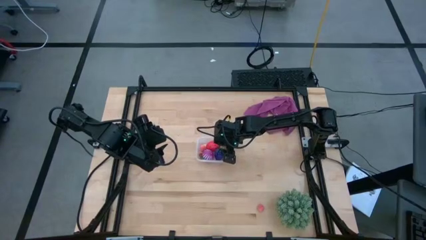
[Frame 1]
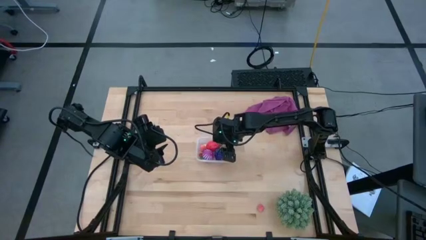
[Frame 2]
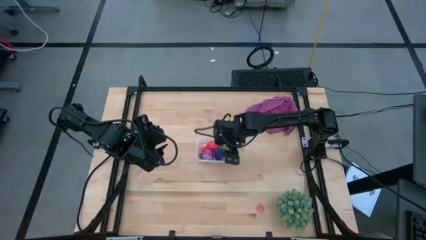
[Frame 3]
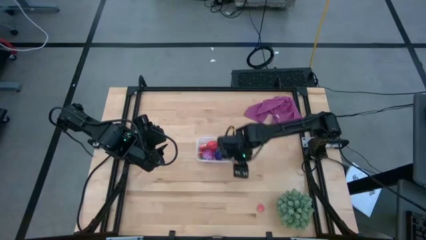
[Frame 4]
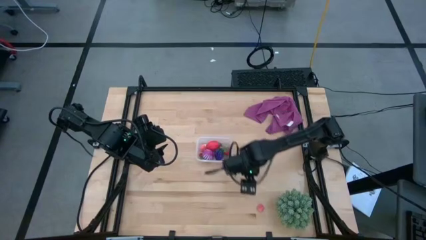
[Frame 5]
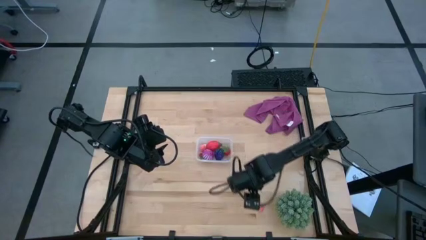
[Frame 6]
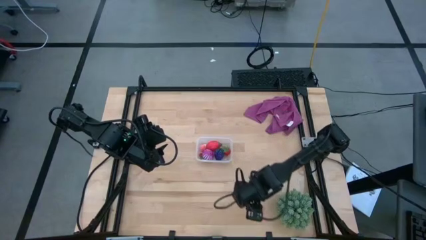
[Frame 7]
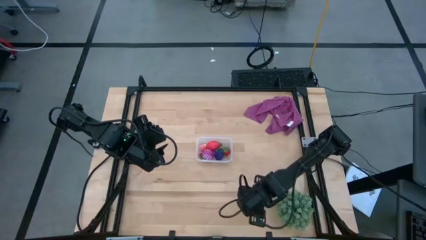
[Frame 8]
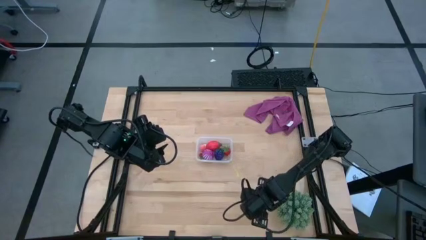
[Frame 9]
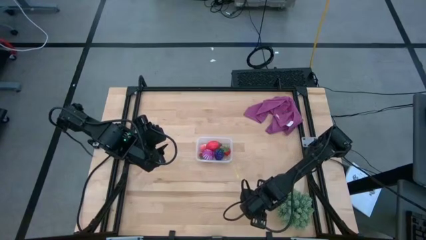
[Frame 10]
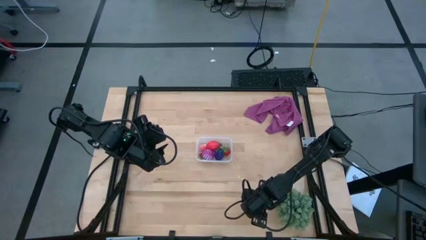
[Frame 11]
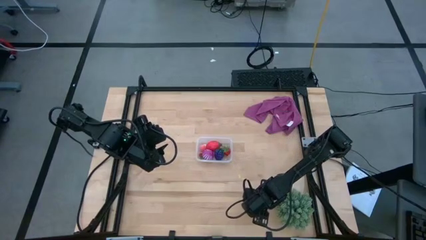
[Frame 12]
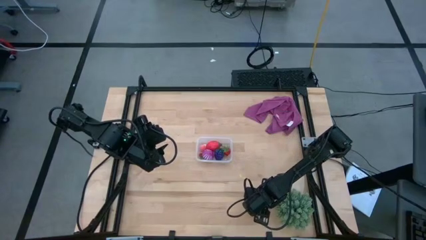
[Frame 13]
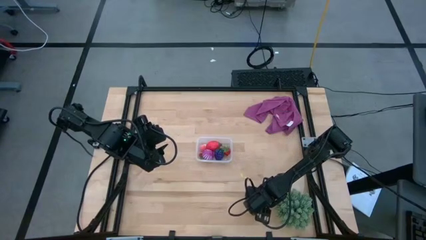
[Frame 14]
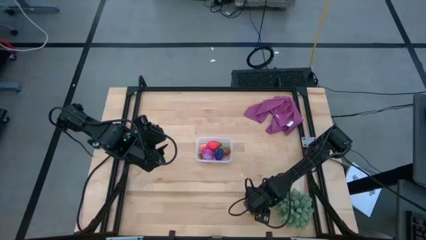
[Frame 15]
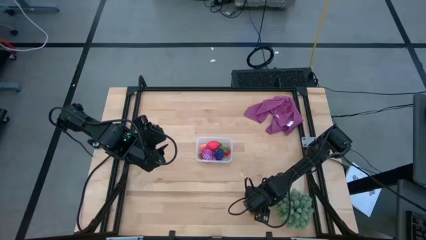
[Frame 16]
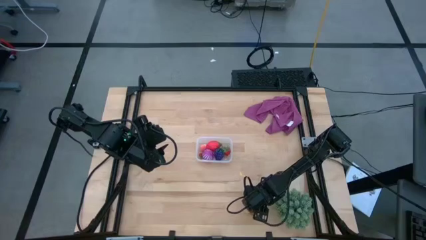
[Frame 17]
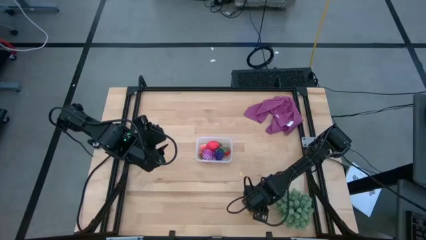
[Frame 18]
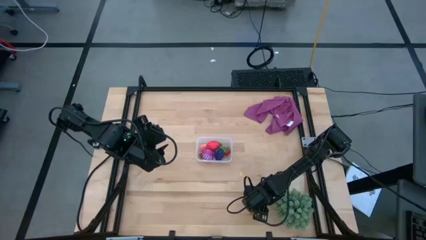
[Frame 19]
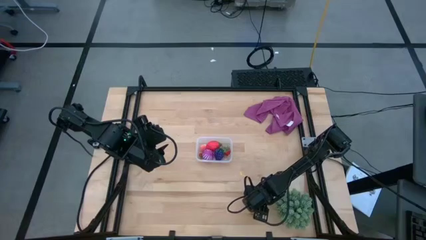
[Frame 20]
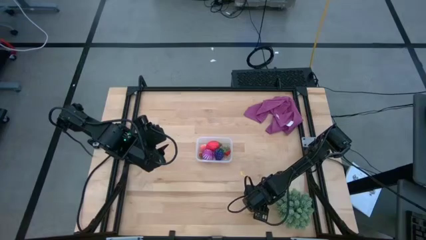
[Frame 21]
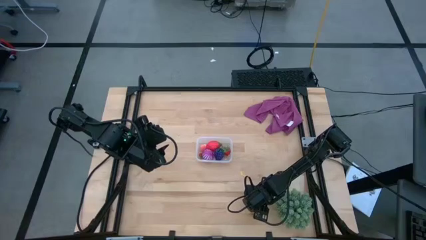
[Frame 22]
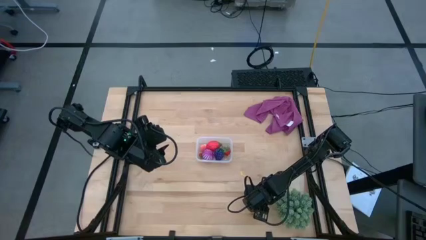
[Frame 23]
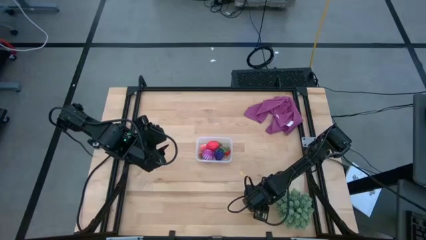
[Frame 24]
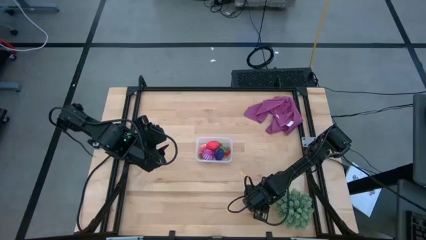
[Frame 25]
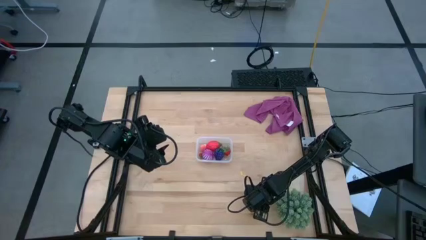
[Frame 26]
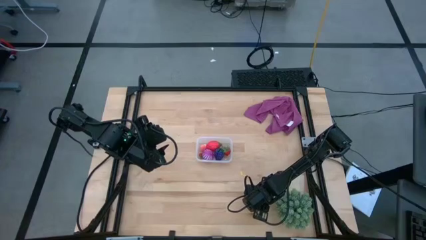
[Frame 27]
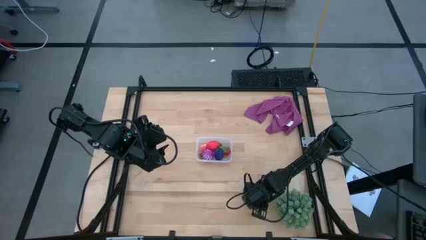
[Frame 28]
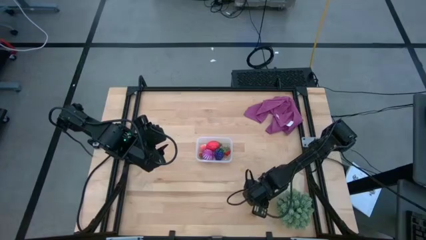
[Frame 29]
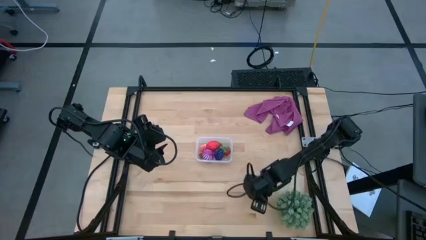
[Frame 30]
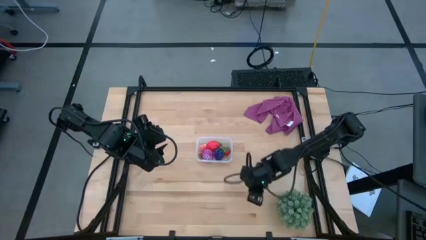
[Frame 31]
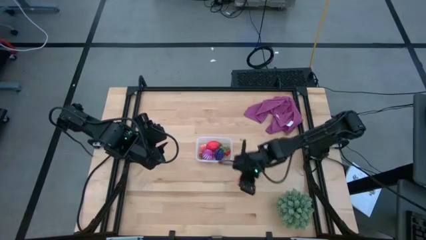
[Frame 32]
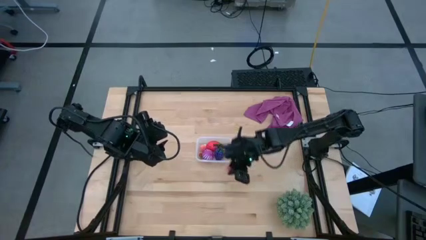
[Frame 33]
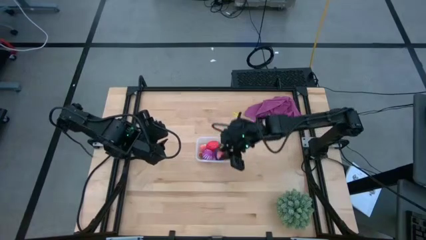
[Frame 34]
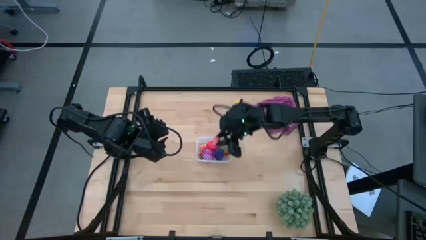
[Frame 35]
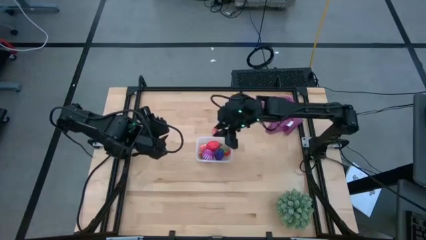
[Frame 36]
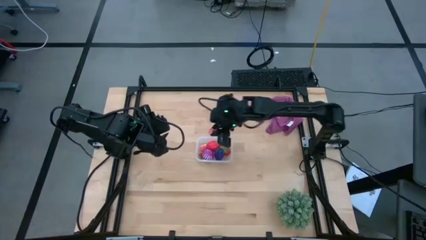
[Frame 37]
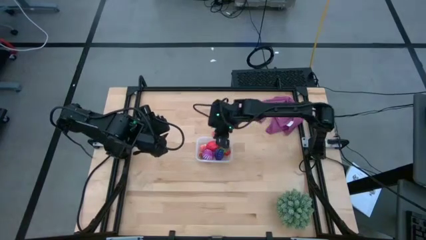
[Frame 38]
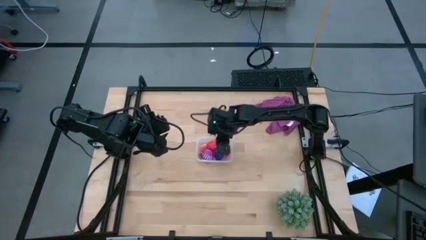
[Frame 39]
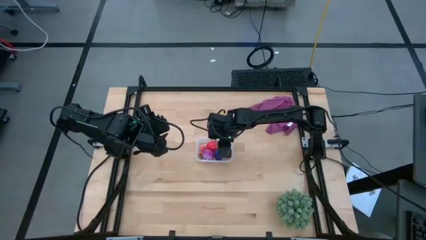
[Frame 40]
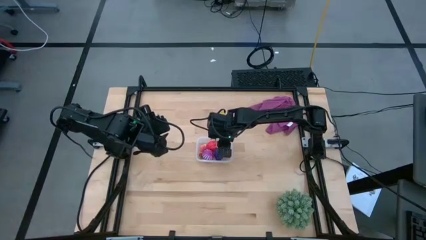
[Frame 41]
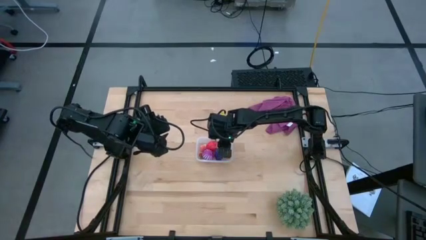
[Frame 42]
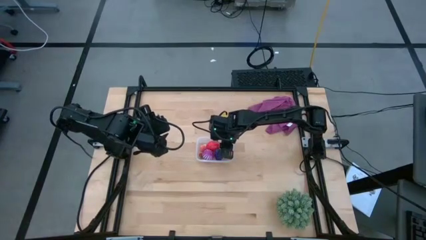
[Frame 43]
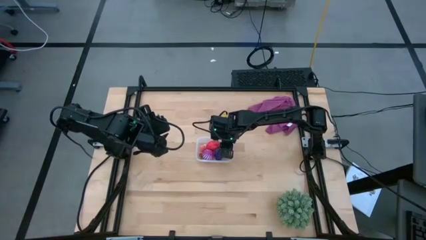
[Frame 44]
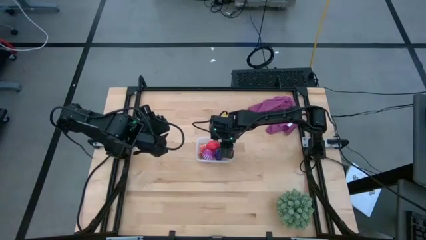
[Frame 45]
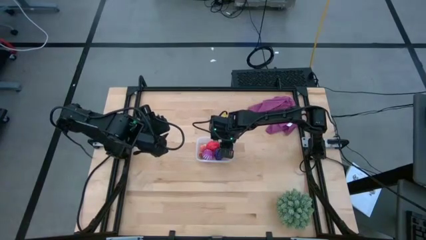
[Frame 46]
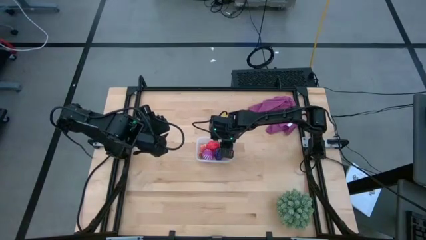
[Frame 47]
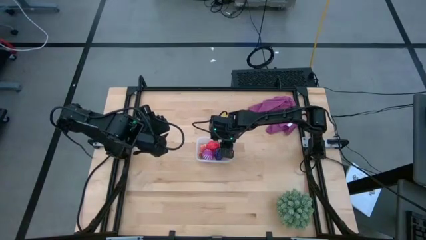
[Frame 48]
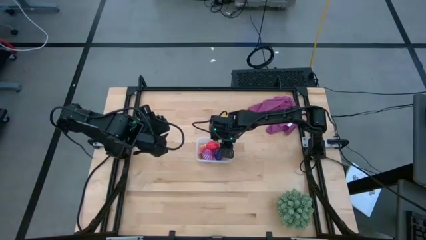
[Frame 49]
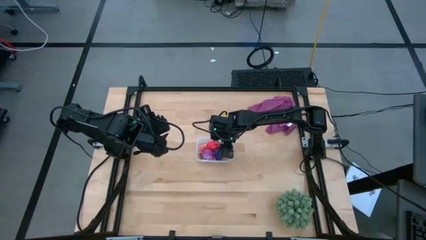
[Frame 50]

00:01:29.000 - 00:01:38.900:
Task: Pick and placing Produce into tupperware
Put the pink peach into the transparent container

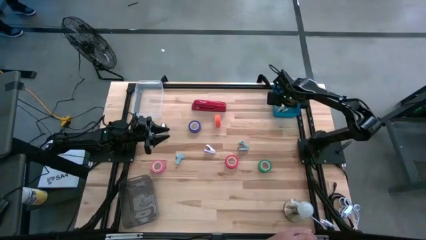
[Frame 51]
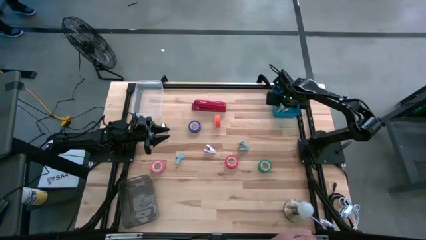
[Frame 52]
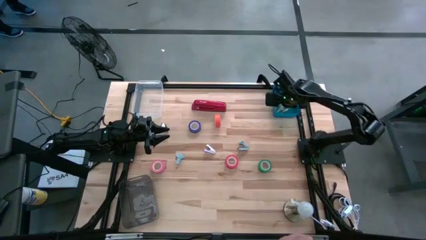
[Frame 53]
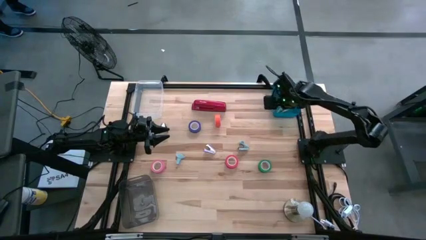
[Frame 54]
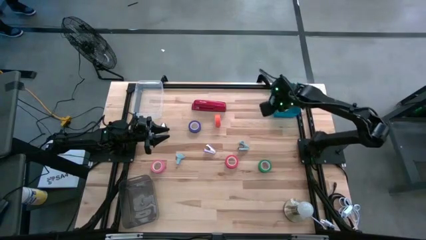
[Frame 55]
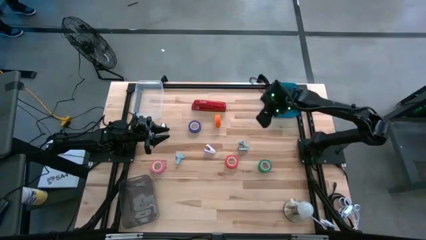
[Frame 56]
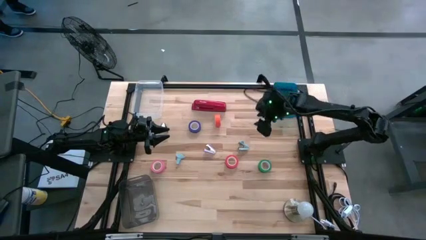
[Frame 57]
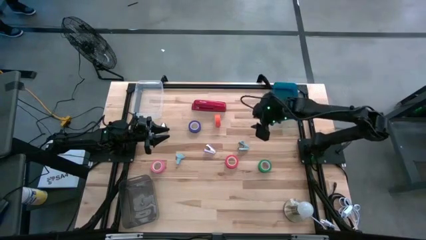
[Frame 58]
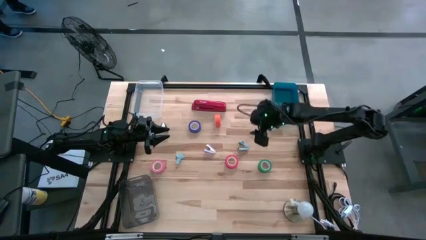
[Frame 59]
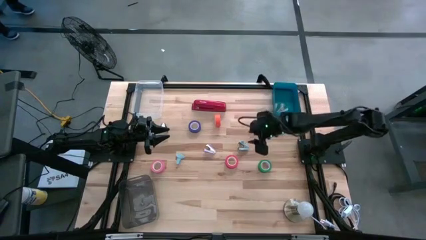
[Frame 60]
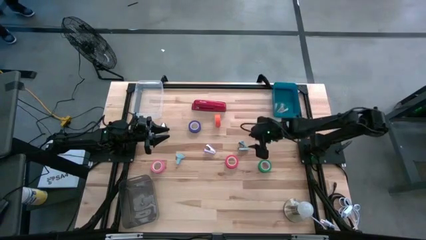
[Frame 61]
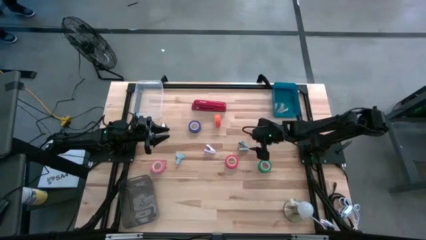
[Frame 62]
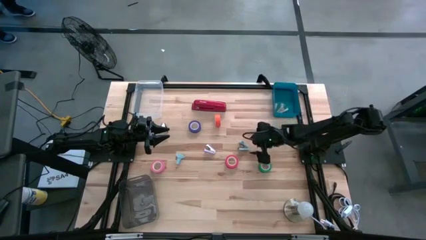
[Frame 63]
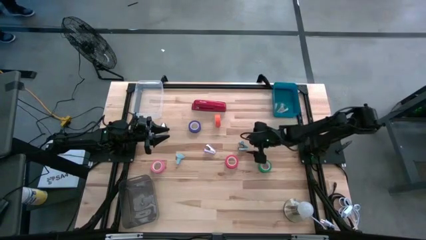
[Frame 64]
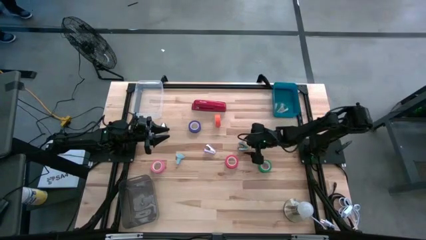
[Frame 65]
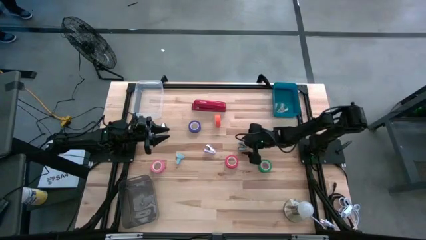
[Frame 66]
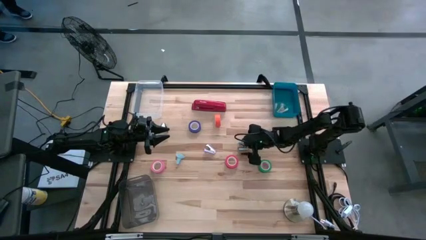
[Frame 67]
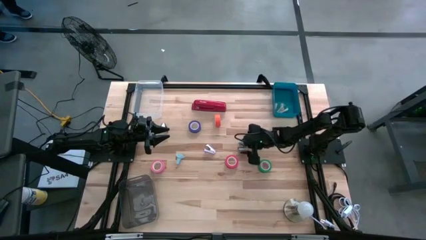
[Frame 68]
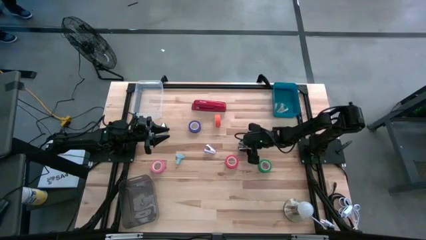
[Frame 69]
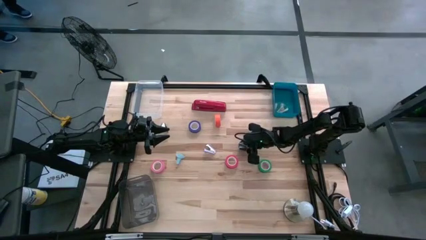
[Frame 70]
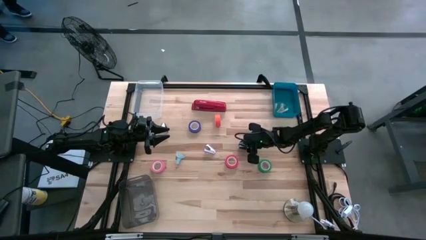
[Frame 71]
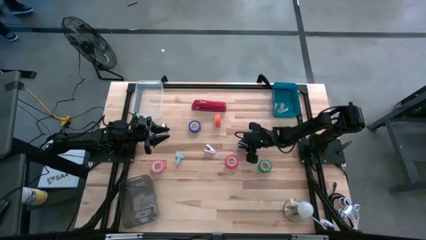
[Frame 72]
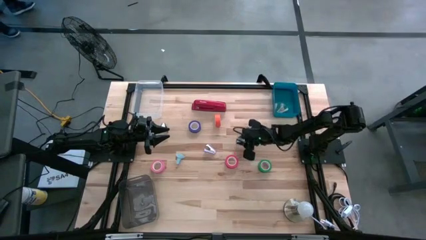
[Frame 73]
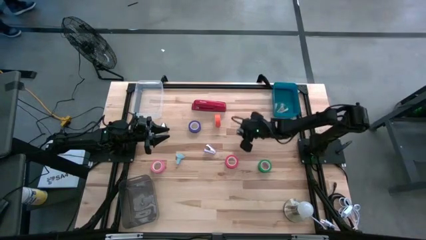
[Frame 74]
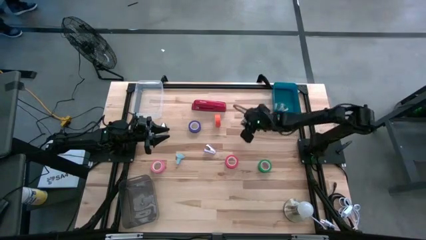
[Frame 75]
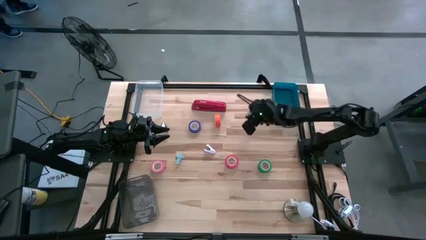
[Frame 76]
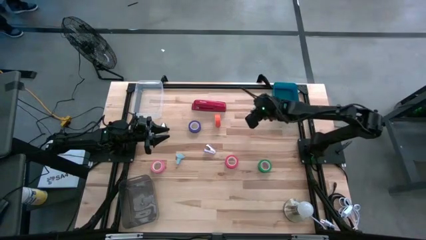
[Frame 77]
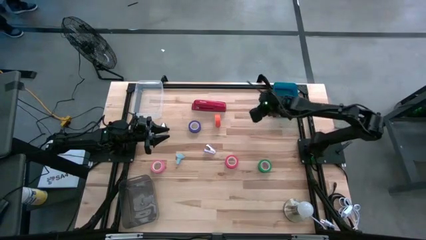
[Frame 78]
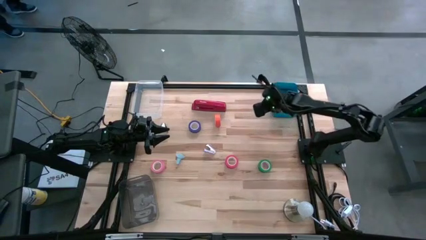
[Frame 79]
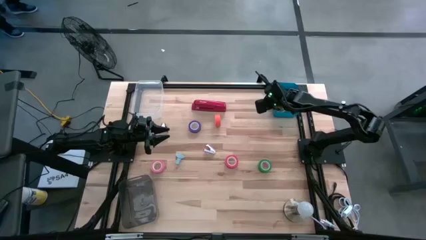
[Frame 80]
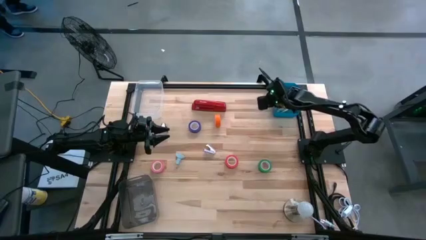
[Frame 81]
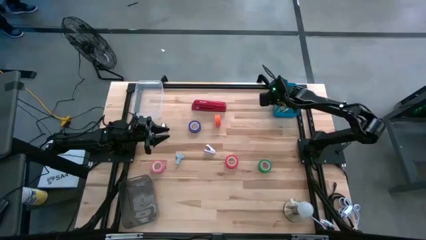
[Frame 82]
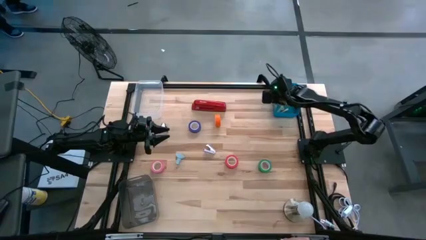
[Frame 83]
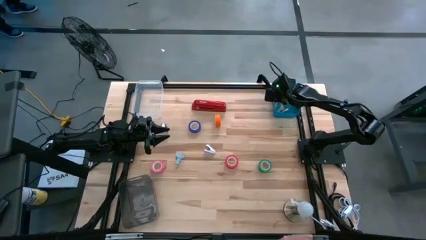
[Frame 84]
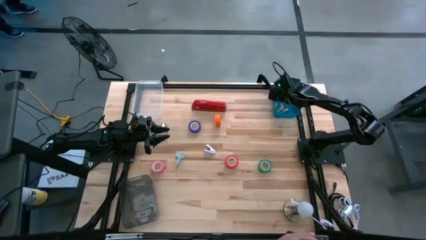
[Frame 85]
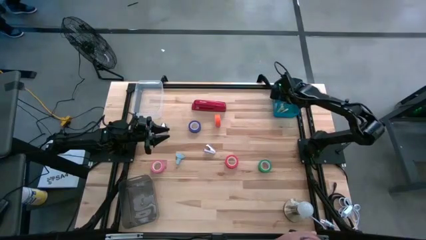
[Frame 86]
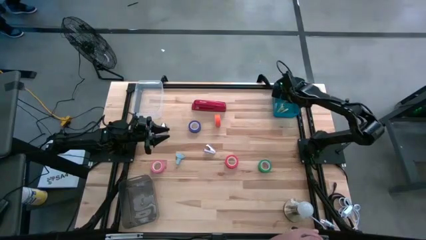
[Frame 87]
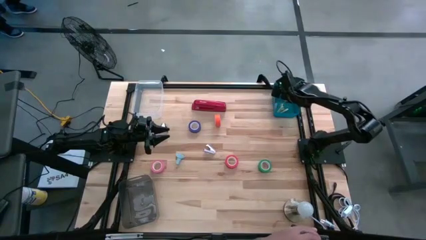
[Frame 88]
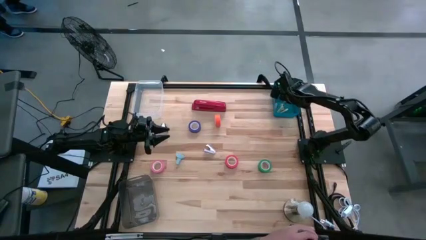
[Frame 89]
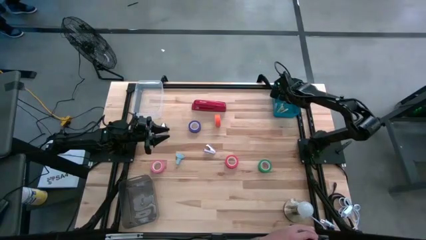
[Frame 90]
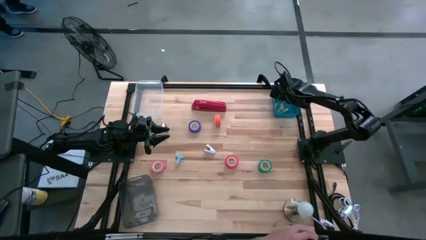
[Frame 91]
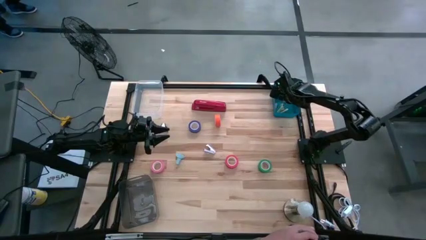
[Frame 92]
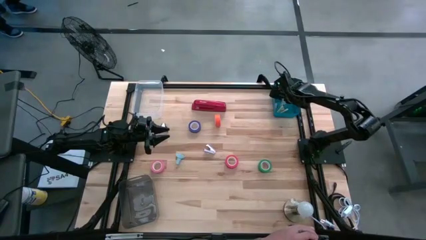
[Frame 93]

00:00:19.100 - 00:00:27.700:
Task: Pick and place Stapler, Stapler remover, tape
Put the right light blue staple remover into the blue bin
